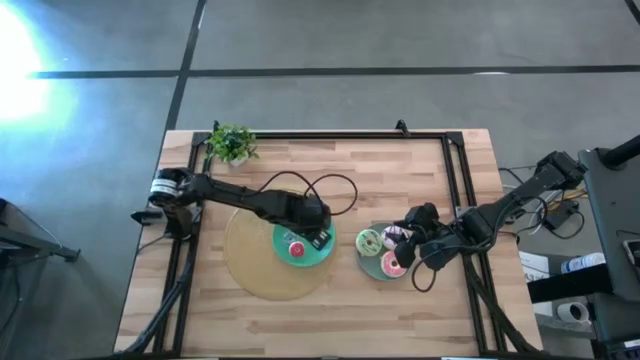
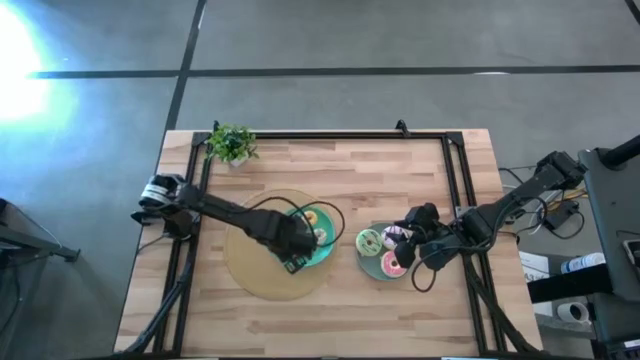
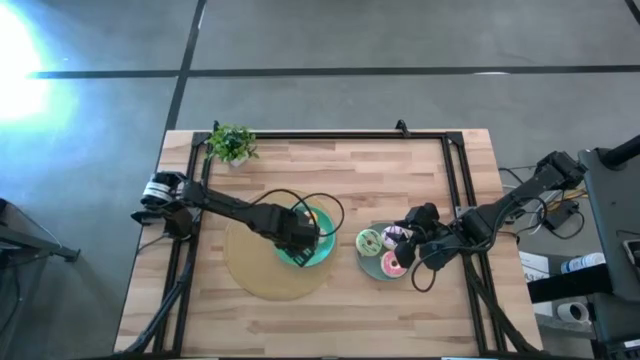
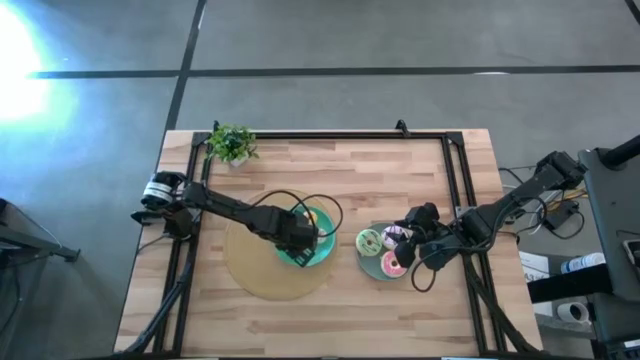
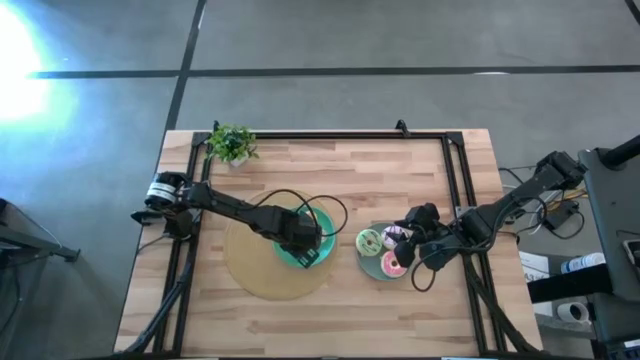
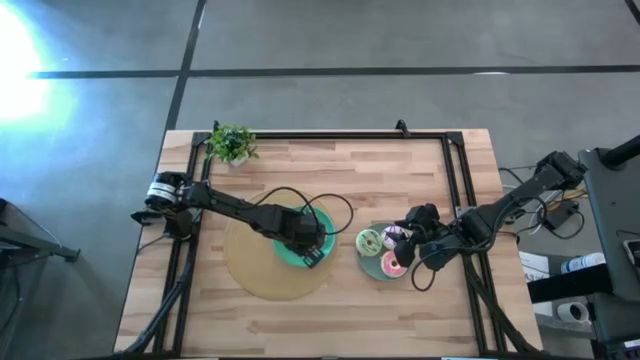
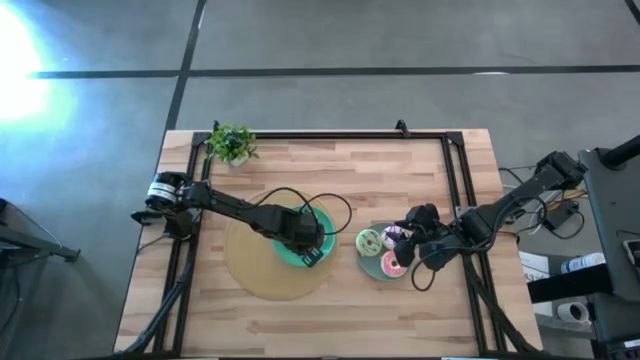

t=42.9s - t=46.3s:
Task: Pick & Place donuts
Adjust the small orange donut

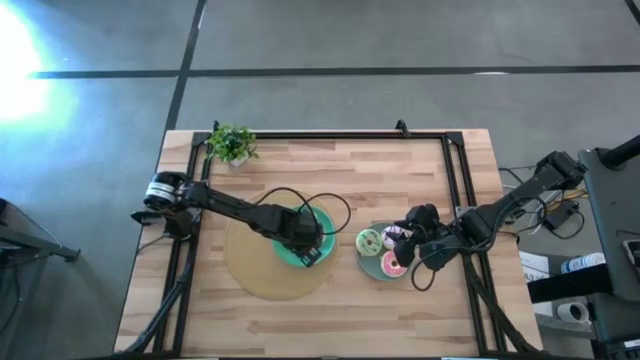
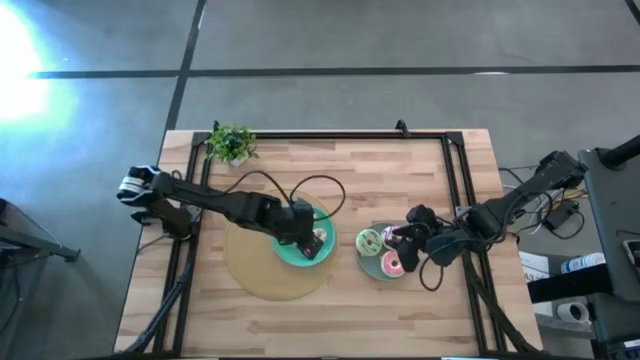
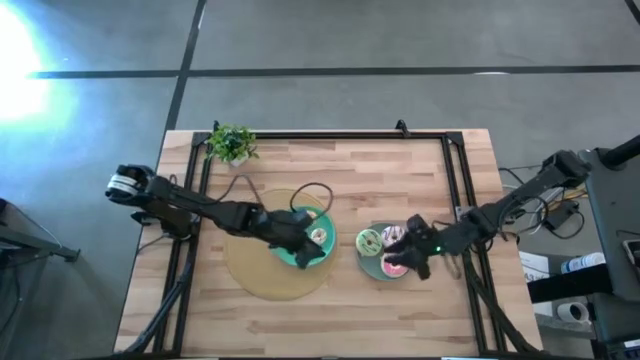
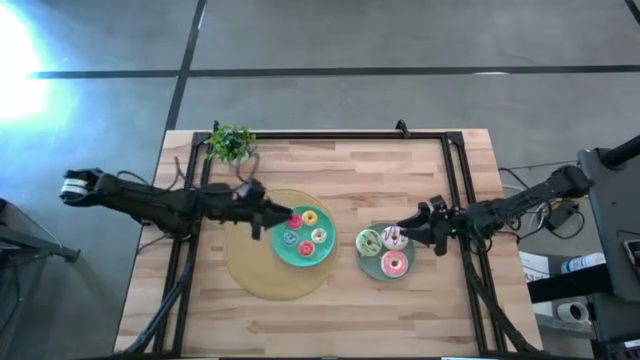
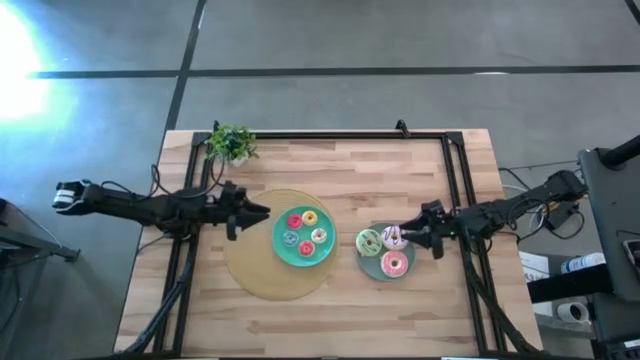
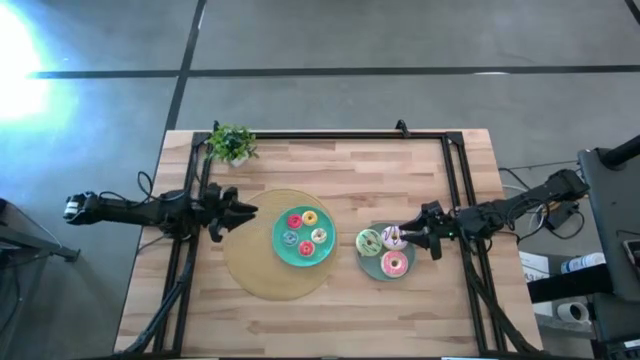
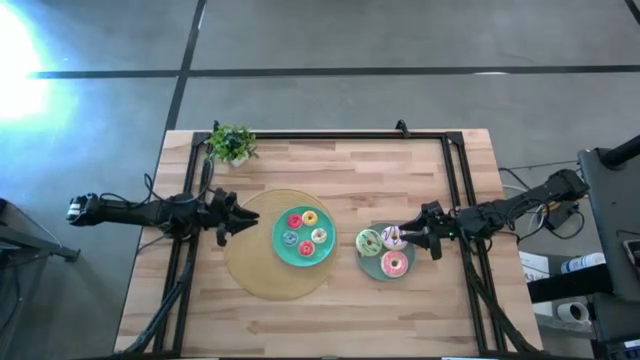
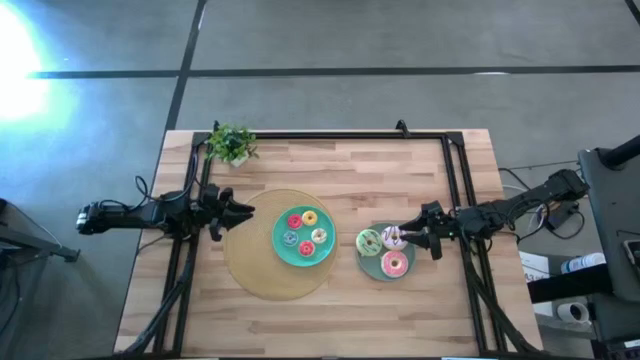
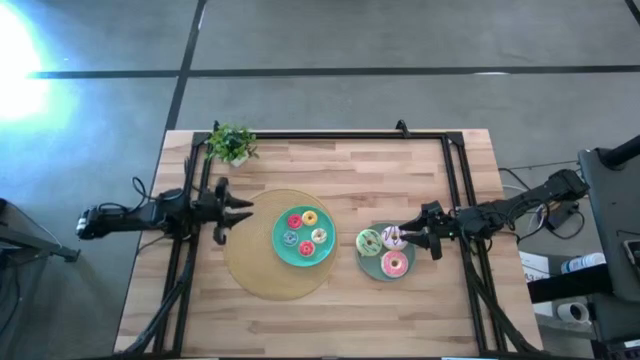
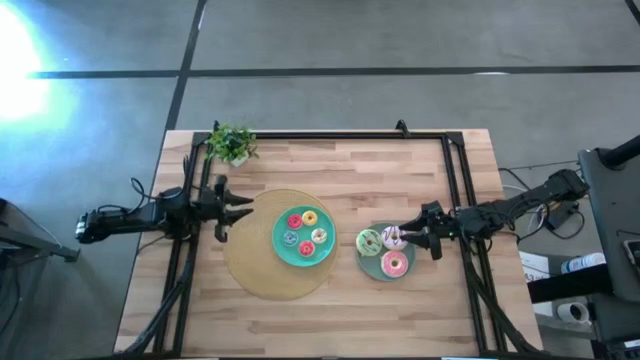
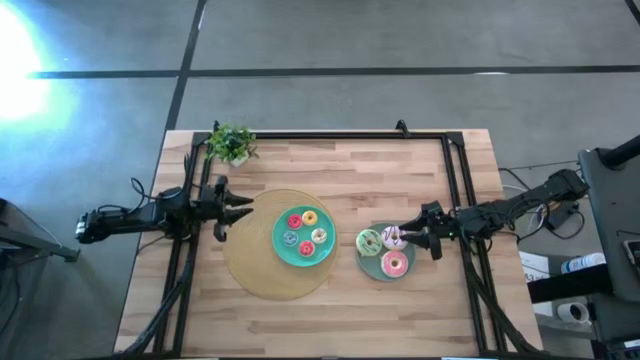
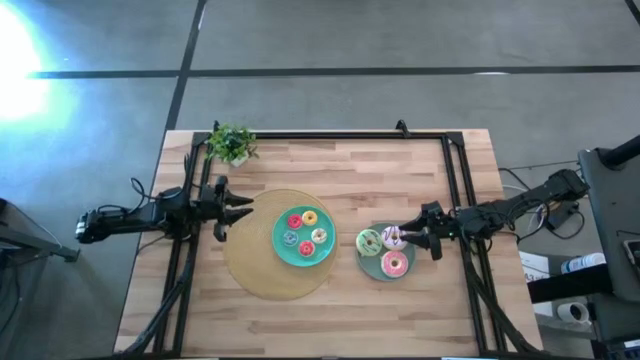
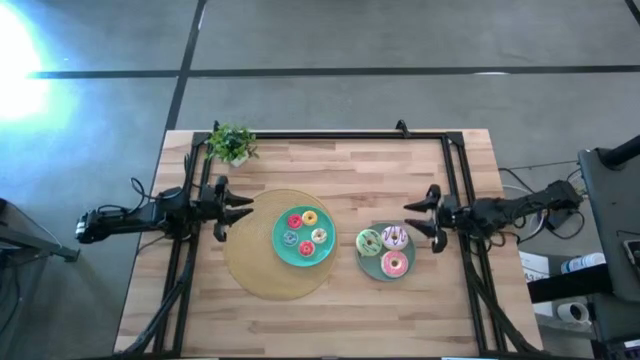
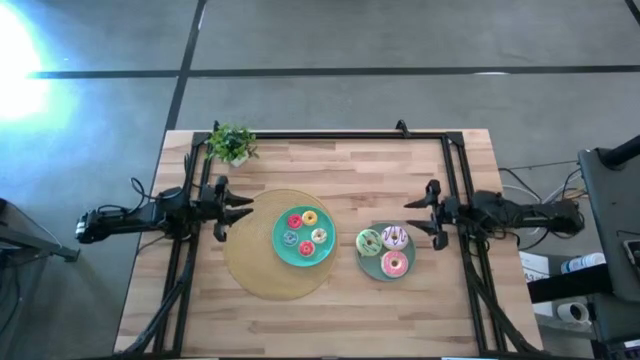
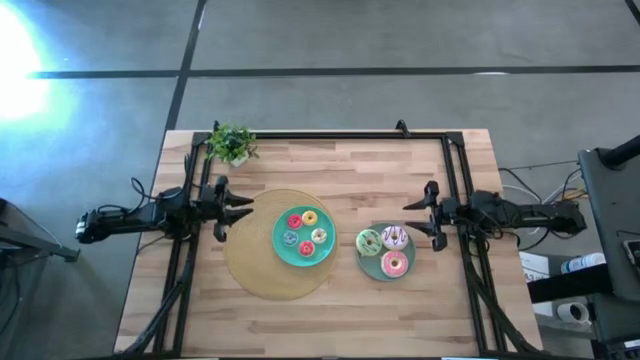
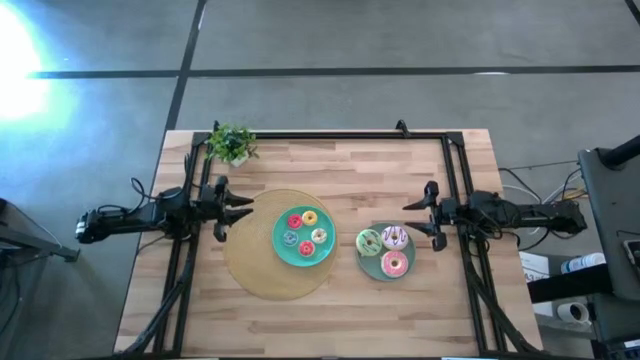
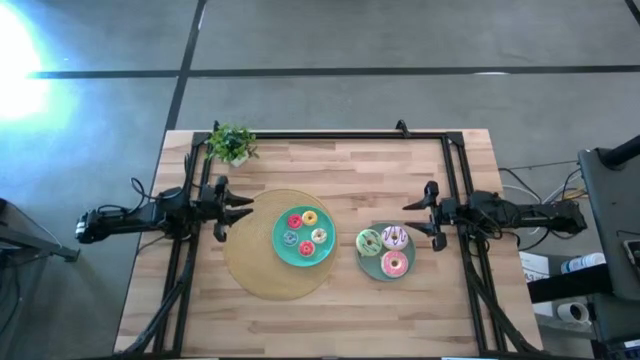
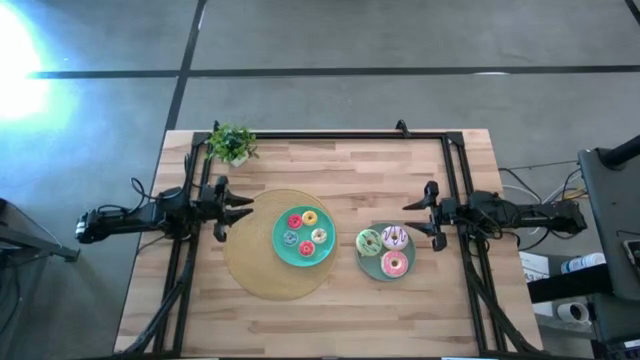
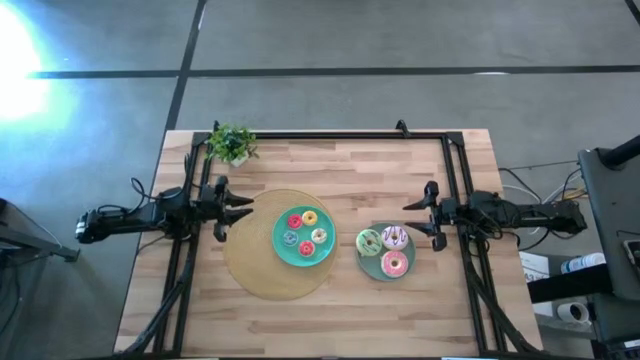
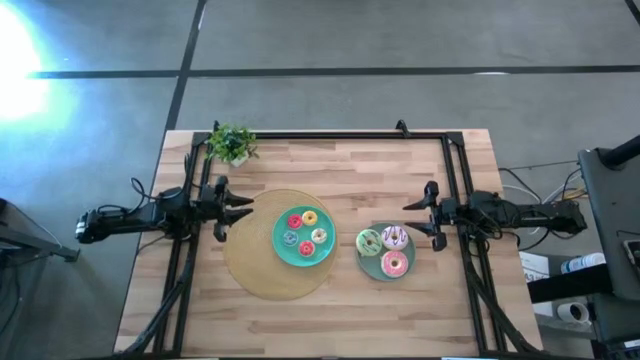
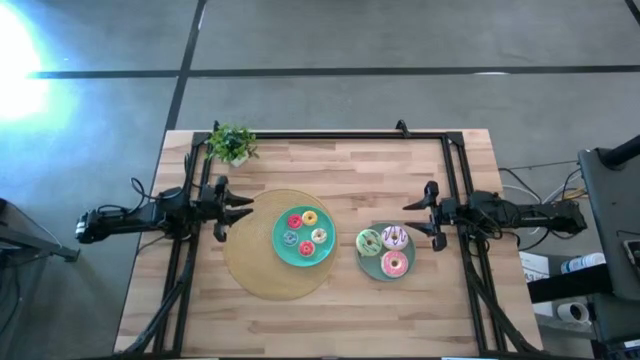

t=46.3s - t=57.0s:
Return to Home Position

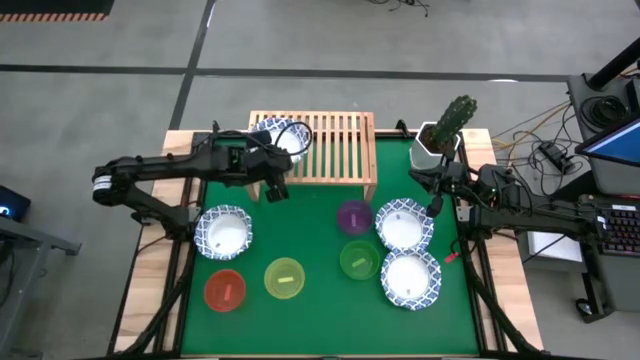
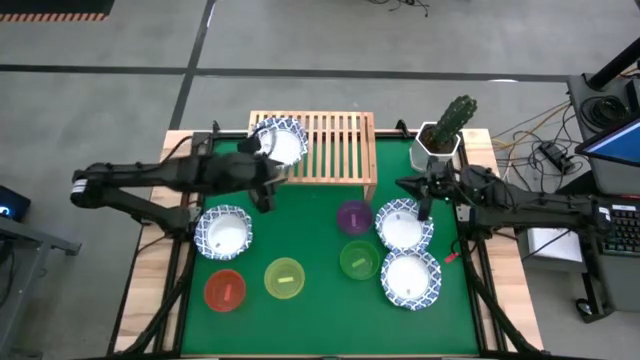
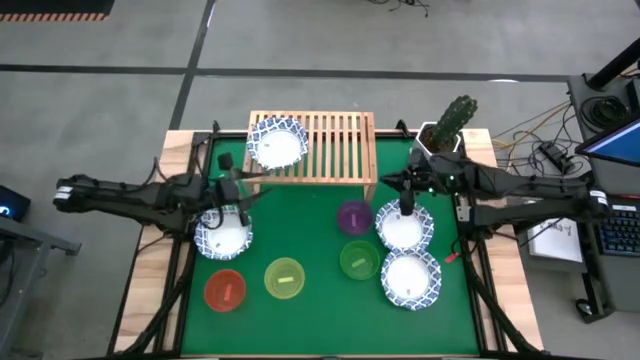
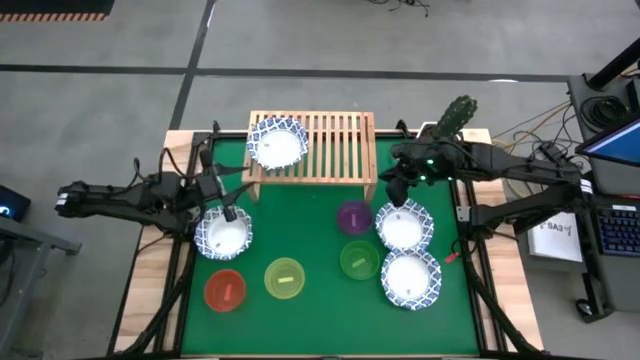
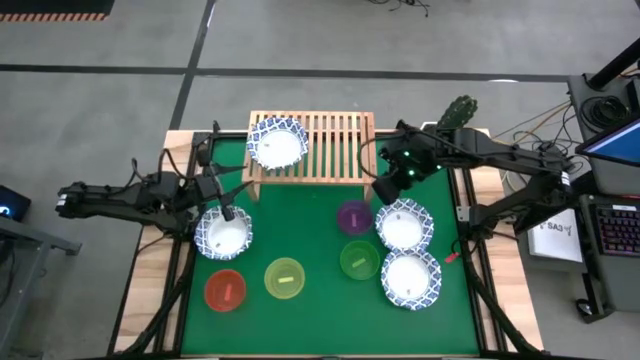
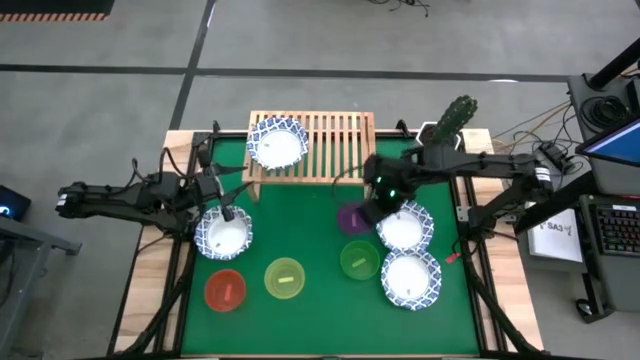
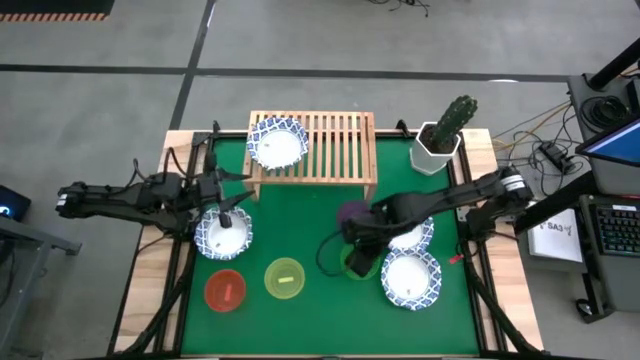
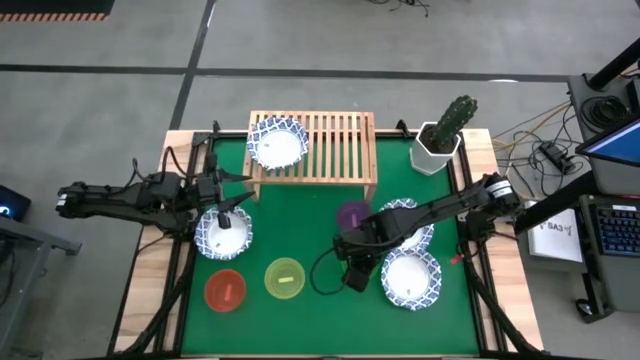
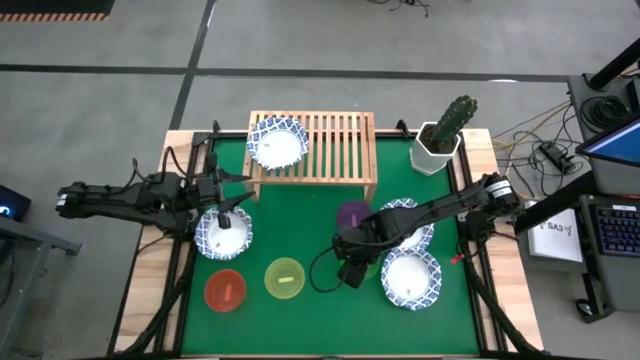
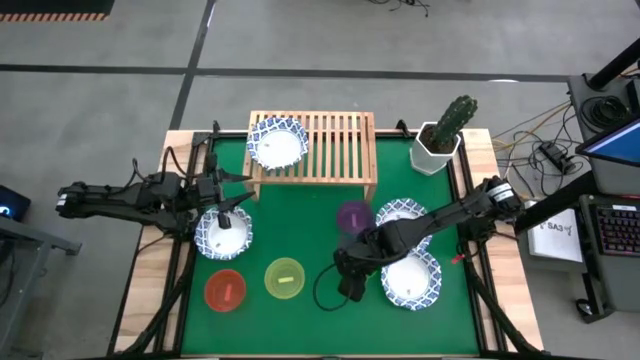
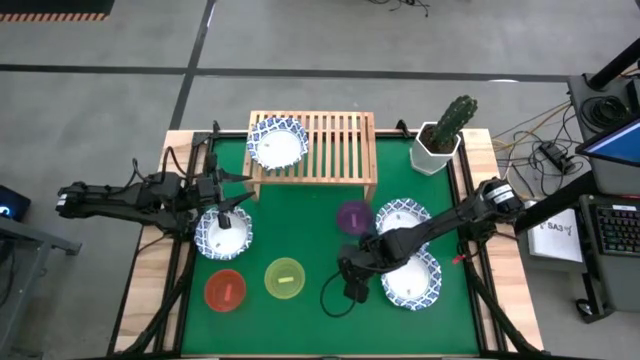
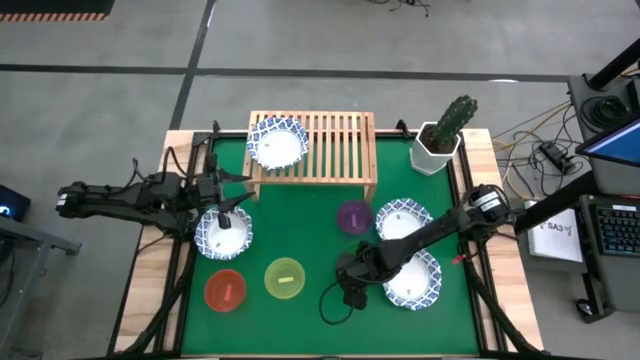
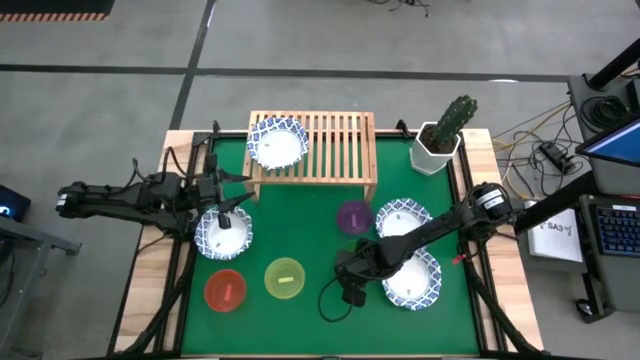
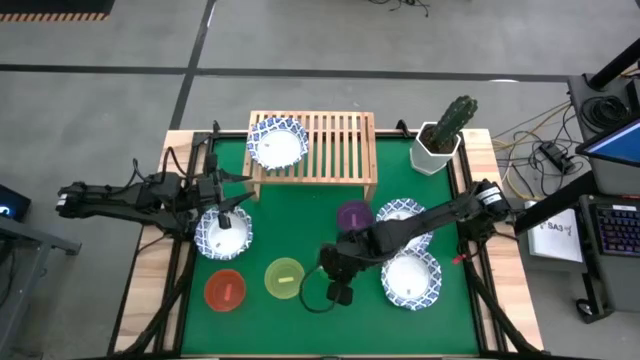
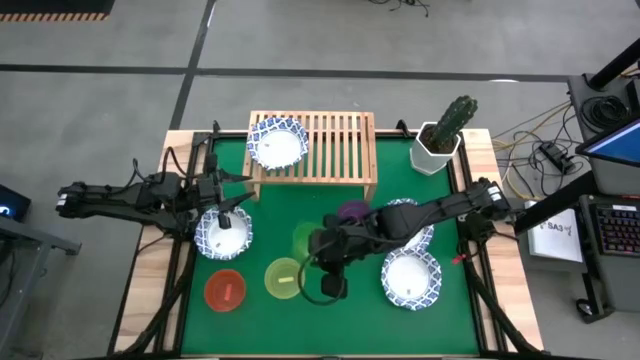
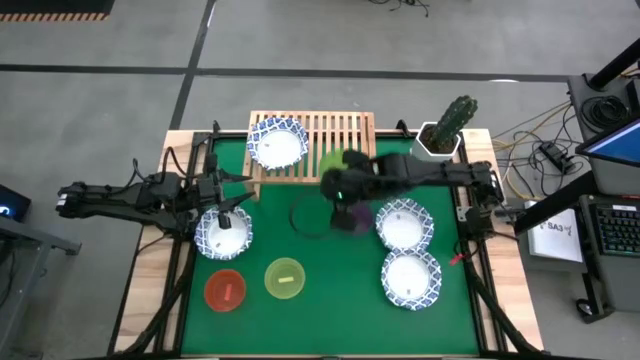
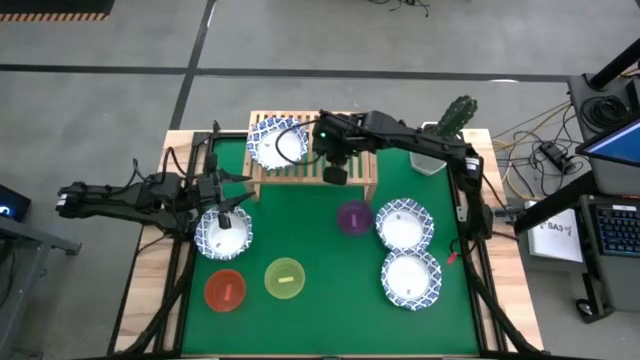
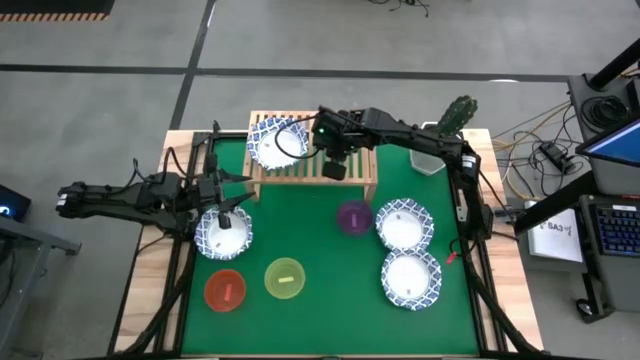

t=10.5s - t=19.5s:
Task: Place and stack bowls onto a shelf
Put the green bowl on the shelf
